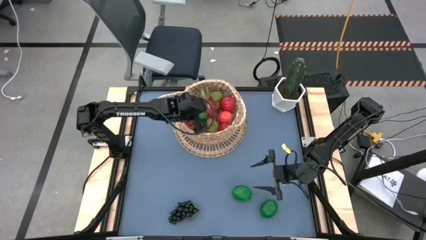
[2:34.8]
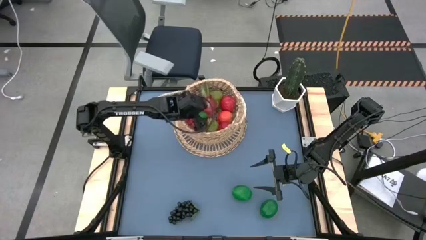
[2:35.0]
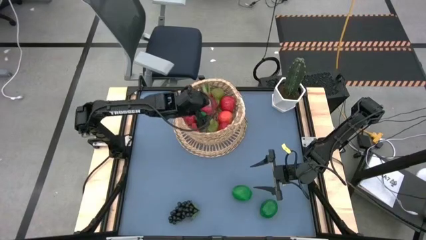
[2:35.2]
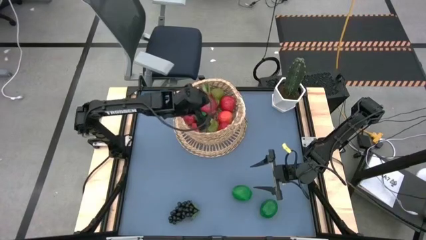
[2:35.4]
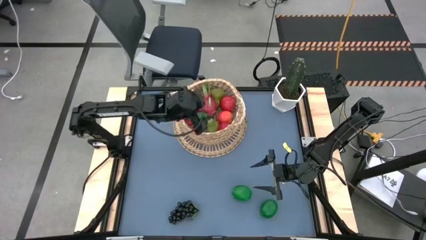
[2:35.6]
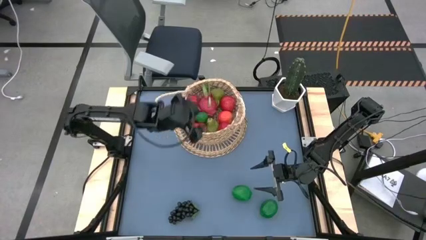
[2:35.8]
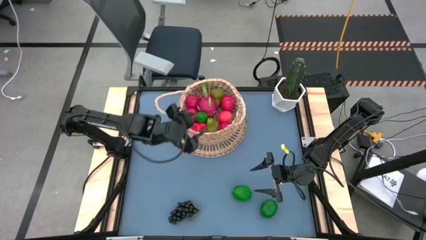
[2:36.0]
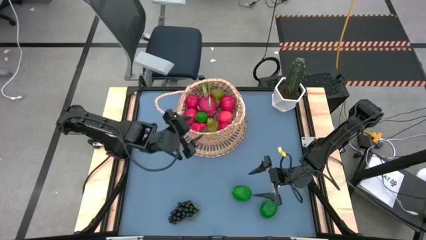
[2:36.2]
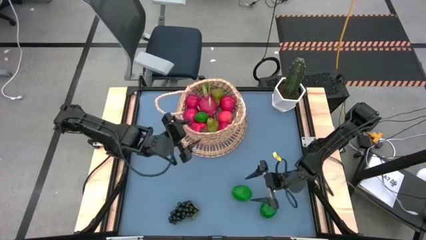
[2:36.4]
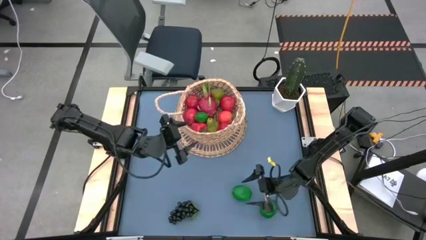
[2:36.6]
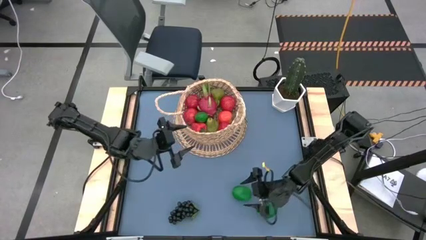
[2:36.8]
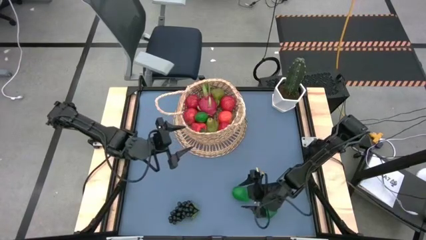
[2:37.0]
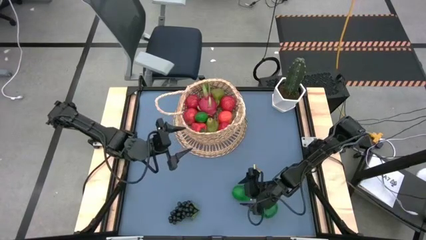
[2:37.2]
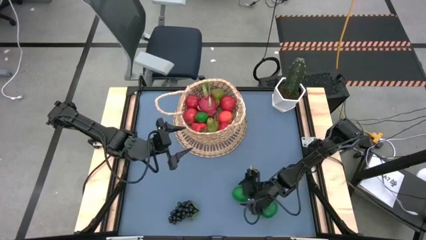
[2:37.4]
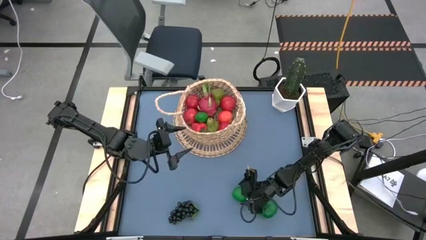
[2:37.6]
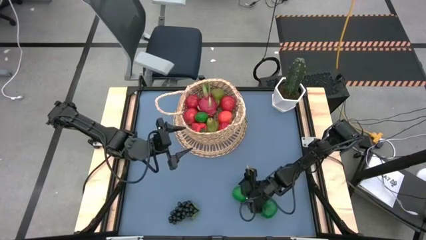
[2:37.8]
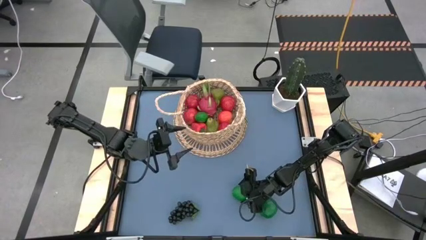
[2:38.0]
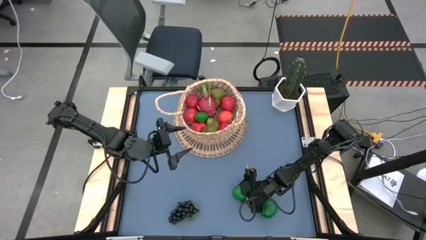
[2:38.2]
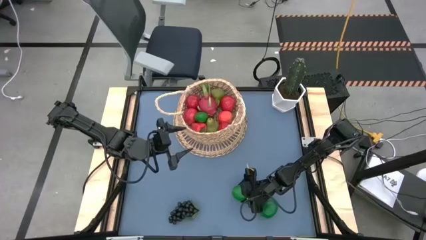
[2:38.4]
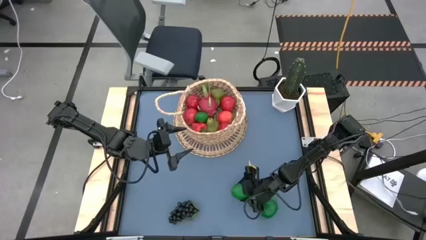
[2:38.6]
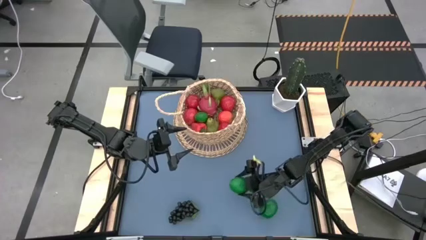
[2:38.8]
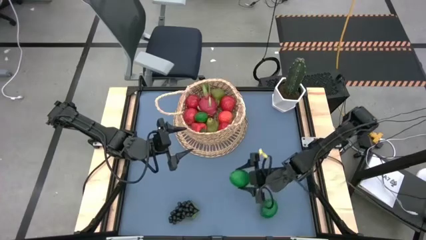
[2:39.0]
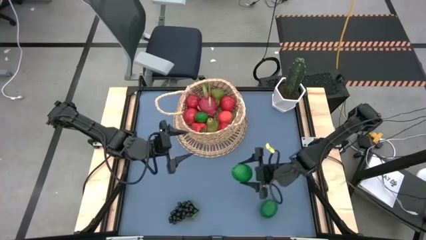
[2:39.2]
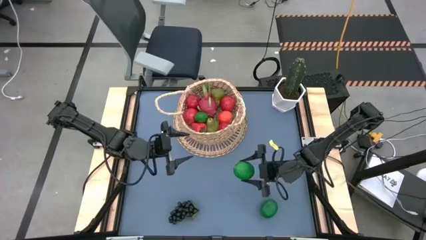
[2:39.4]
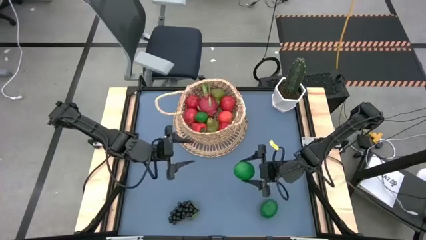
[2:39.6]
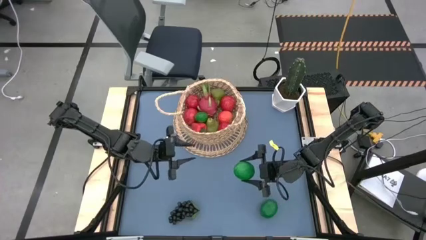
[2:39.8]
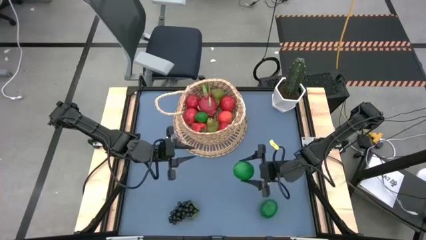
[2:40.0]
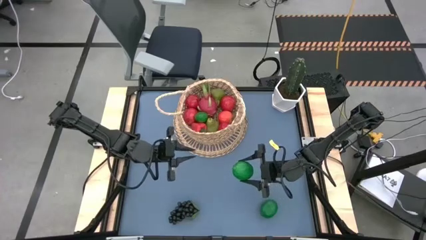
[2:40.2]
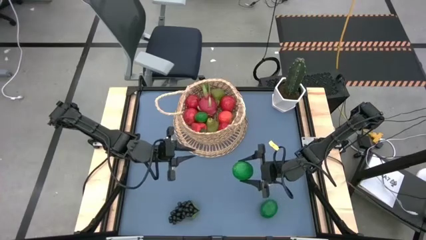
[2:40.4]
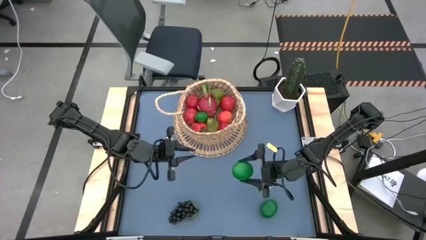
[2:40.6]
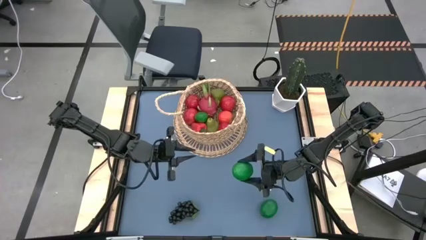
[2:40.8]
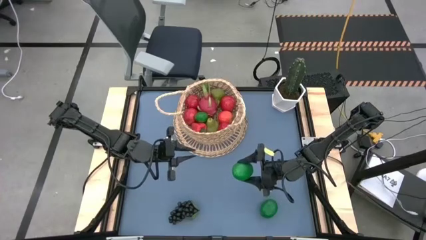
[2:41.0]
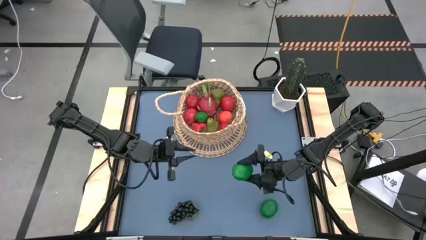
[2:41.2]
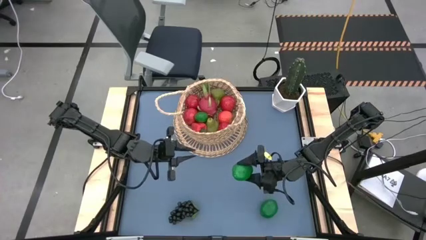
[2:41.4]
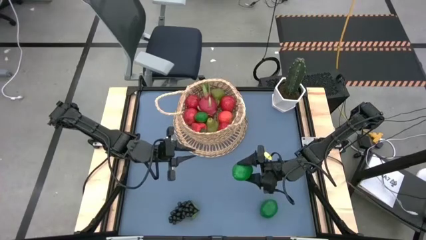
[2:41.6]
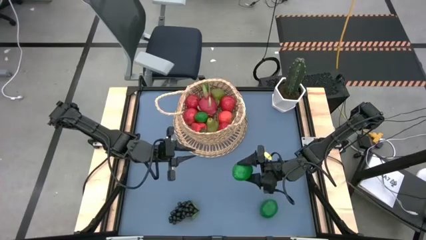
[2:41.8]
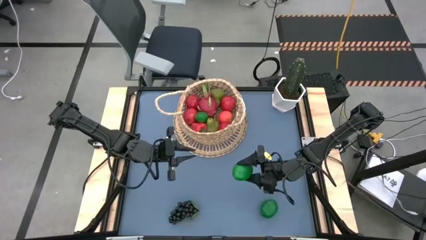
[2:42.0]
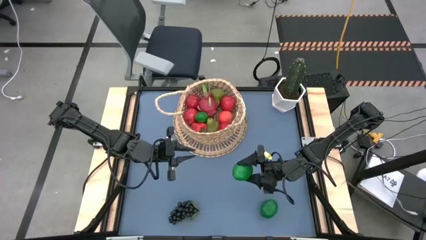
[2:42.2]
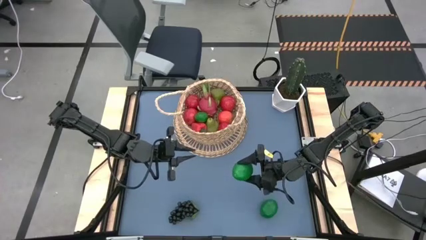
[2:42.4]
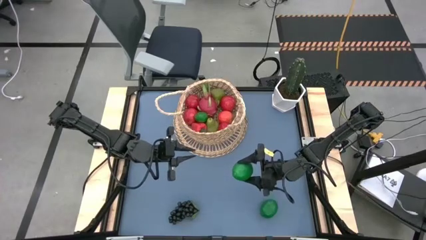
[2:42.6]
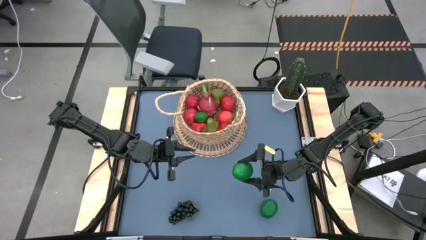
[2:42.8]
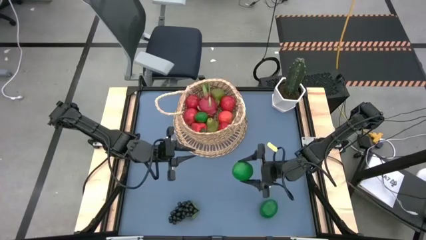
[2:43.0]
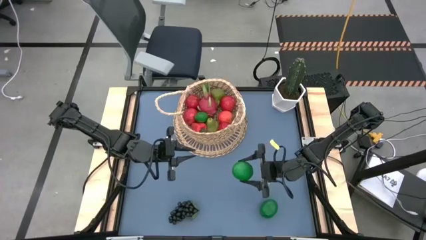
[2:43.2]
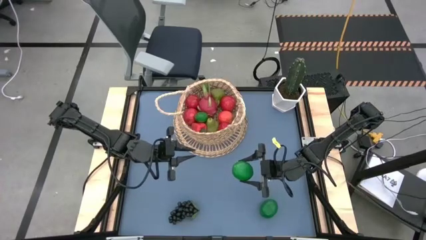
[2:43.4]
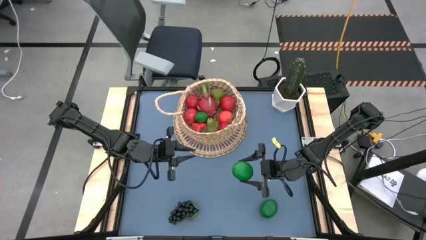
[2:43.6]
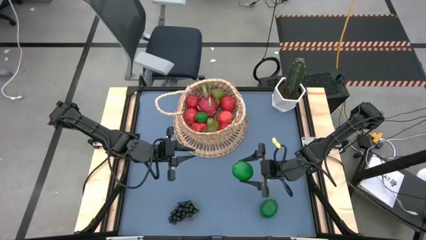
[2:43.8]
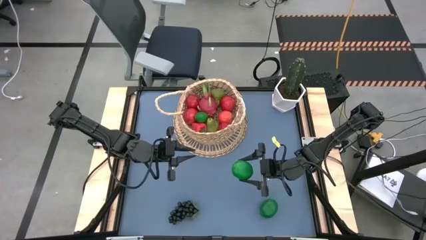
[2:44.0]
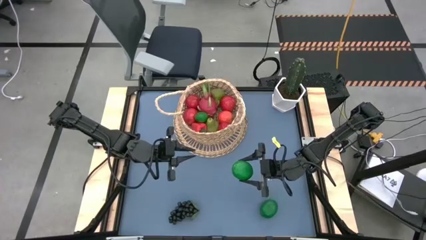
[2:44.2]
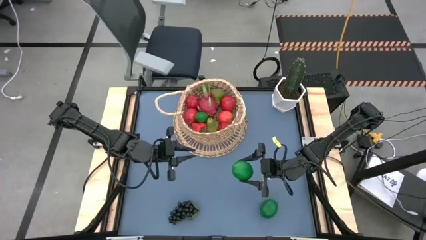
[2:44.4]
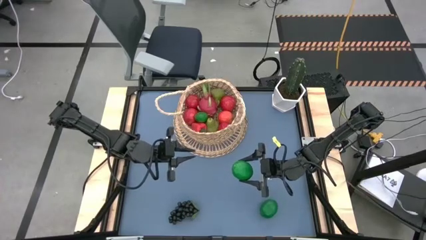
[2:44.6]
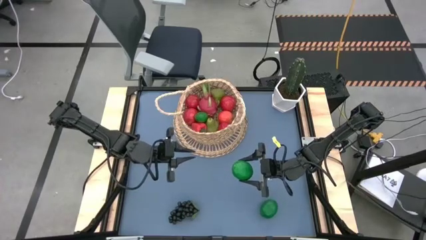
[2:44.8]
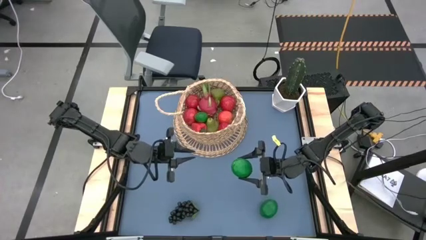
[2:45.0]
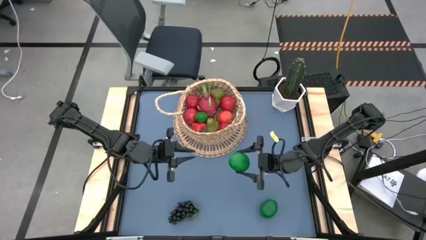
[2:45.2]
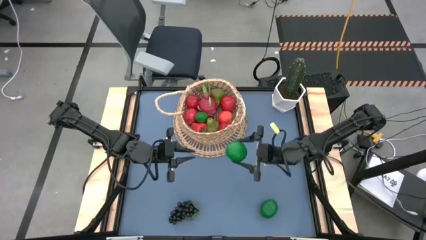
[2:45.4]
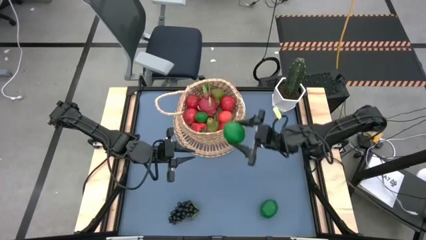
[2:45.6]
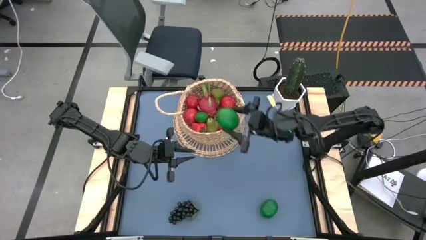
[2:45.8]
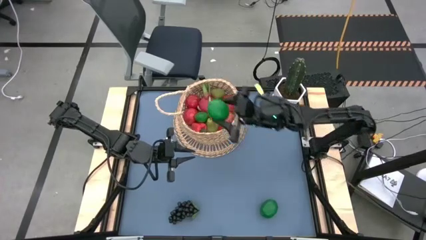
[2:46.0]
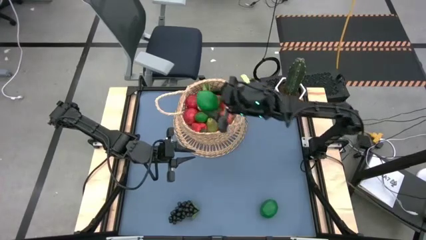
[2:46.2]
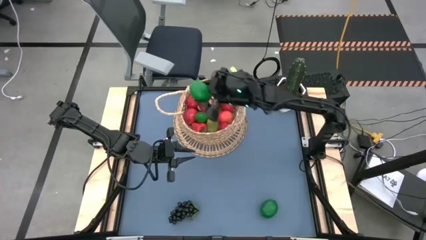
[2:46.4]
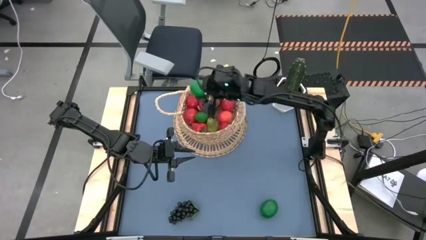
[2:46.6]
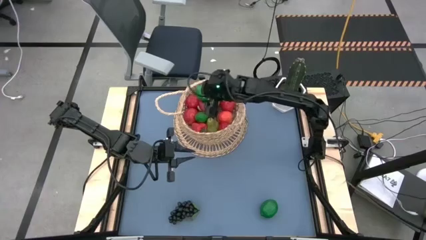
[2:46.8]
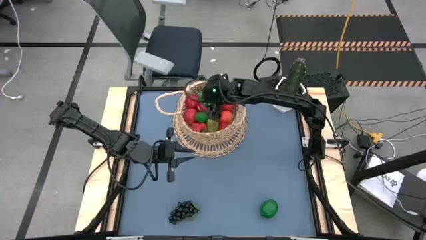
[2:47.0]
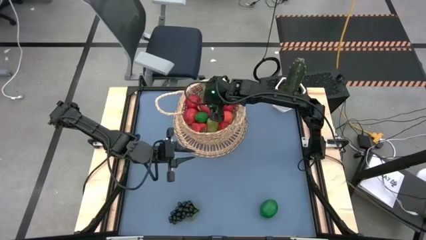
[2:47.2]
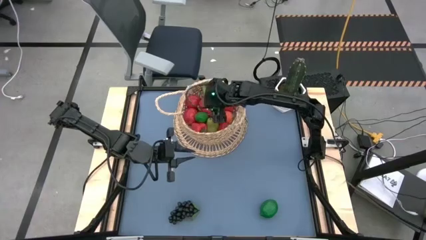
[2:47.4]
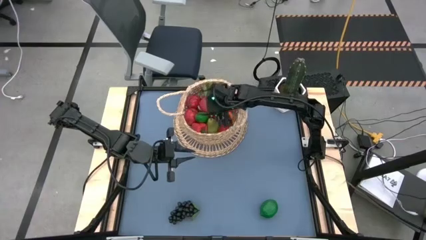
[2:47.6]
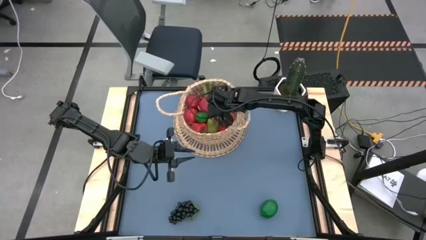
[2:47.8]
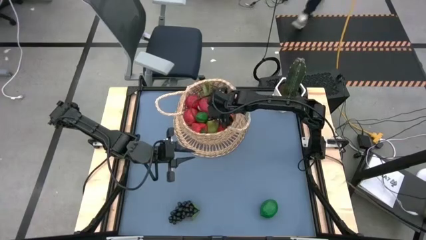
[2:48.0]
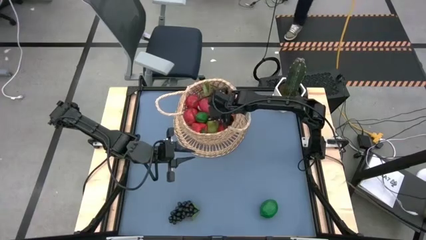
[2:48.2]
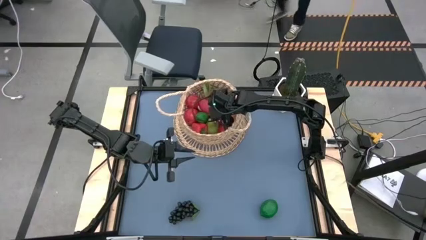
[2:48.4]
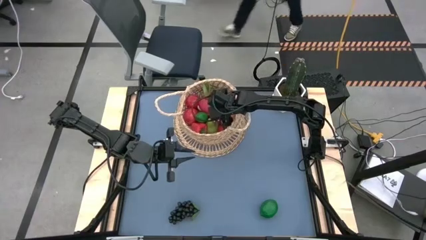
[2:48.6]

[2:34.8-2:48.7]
Task: Build produce basket
Put the lime into the basket
